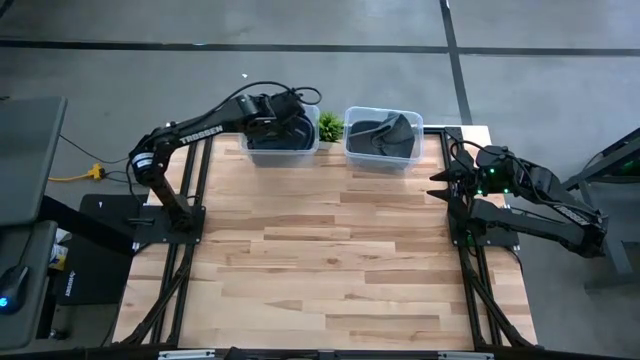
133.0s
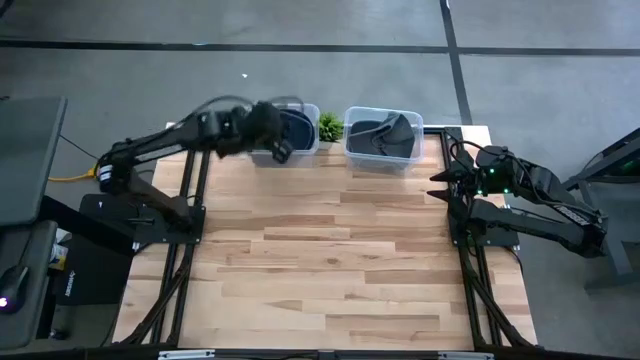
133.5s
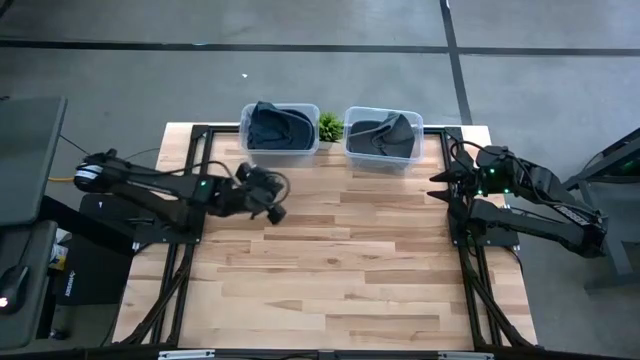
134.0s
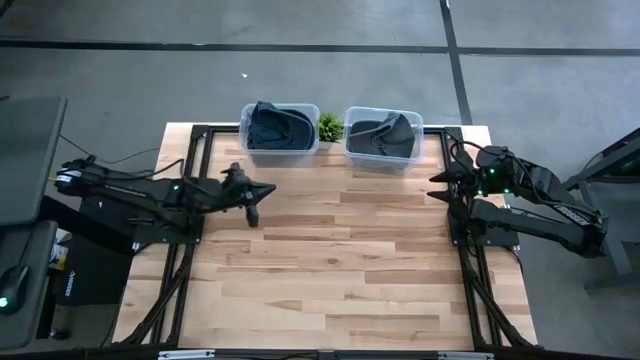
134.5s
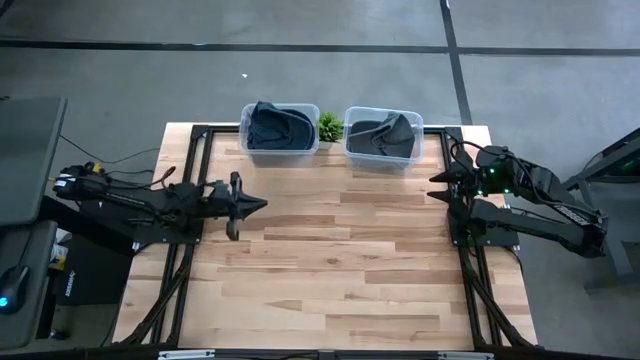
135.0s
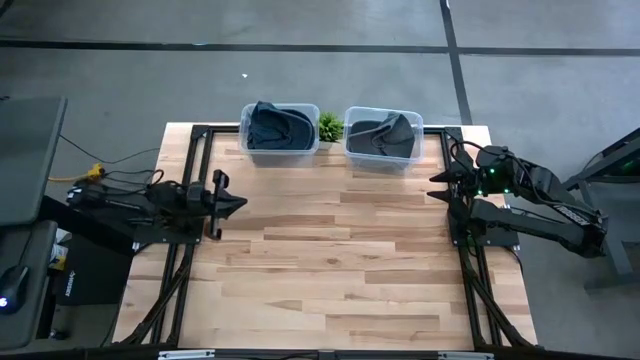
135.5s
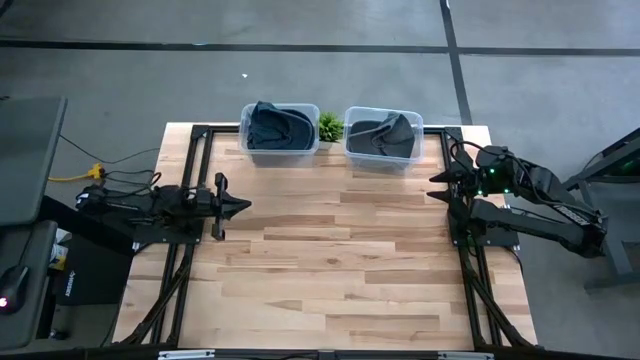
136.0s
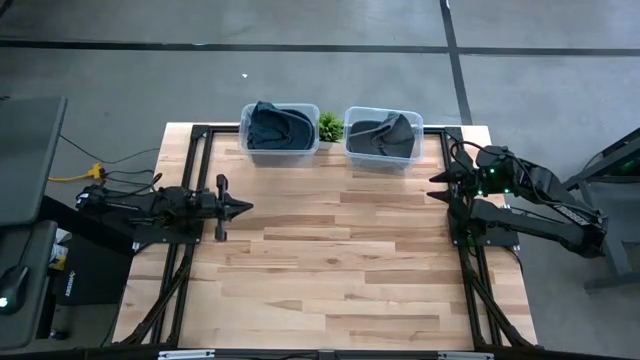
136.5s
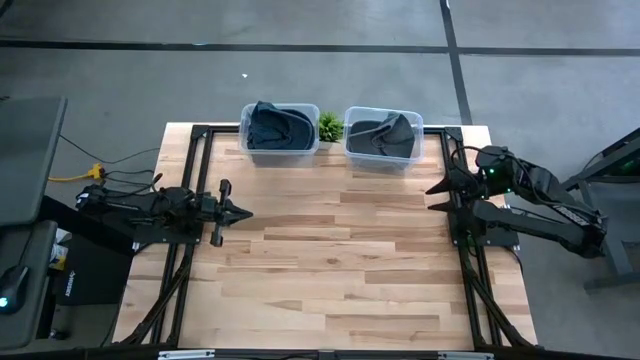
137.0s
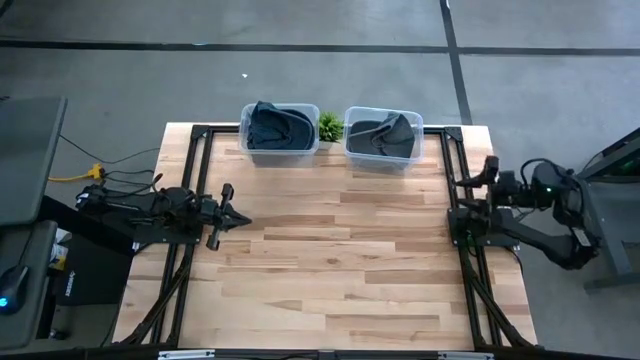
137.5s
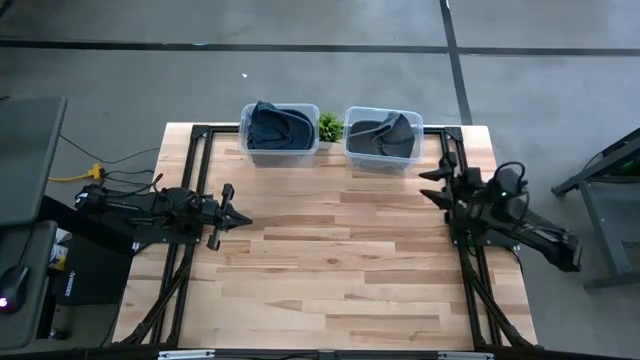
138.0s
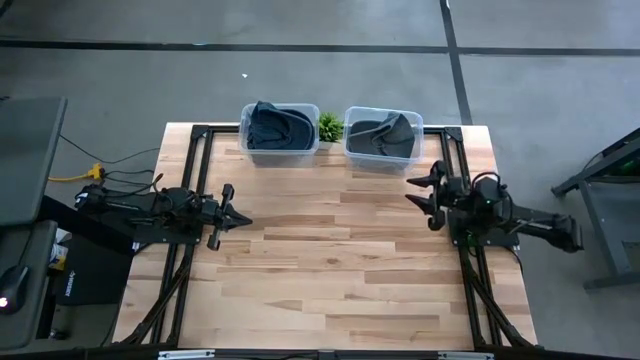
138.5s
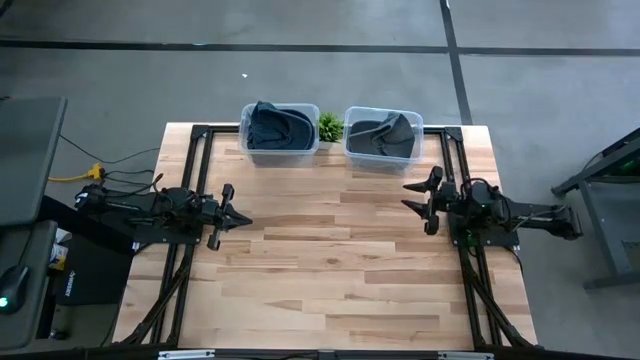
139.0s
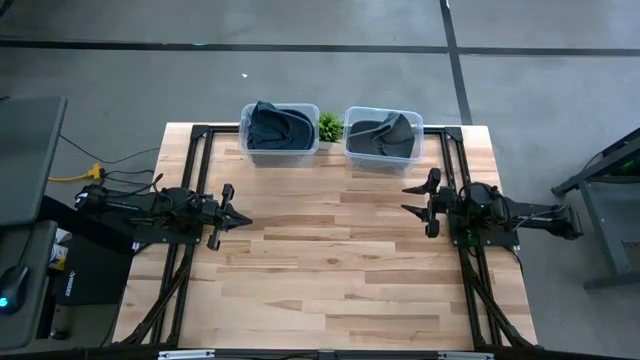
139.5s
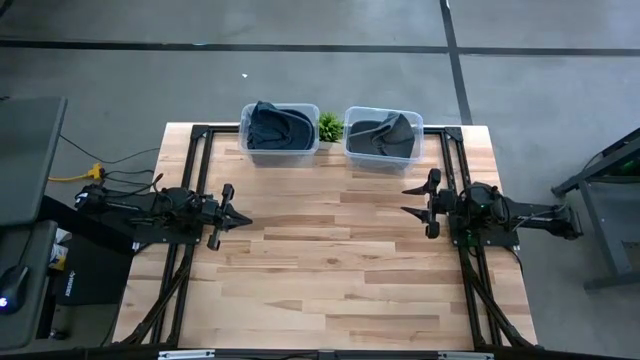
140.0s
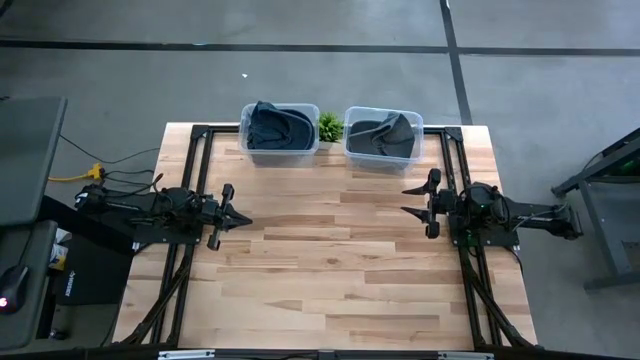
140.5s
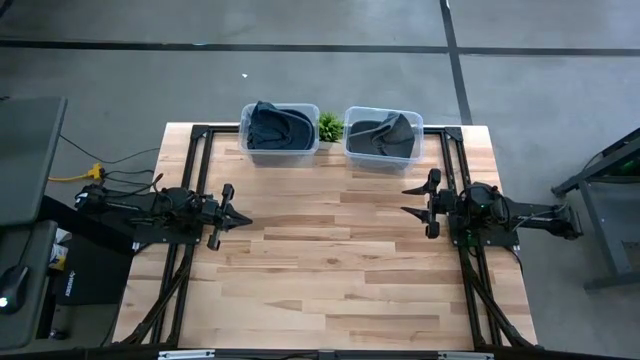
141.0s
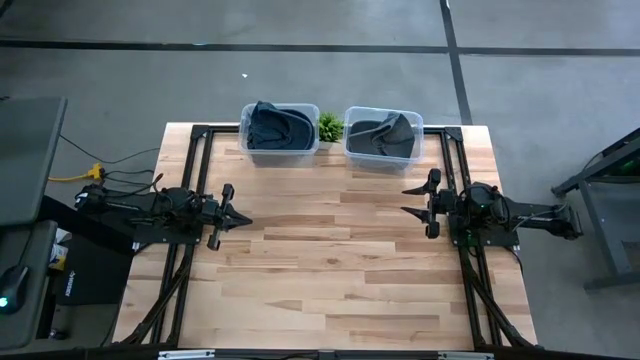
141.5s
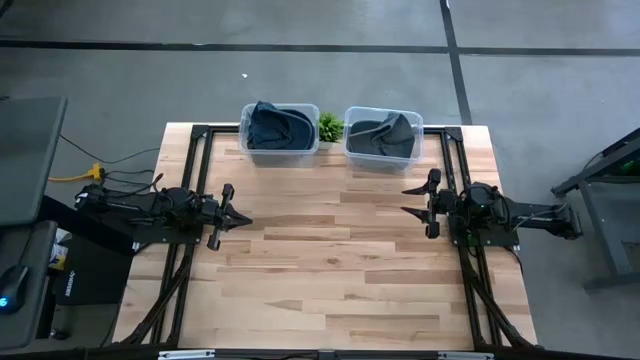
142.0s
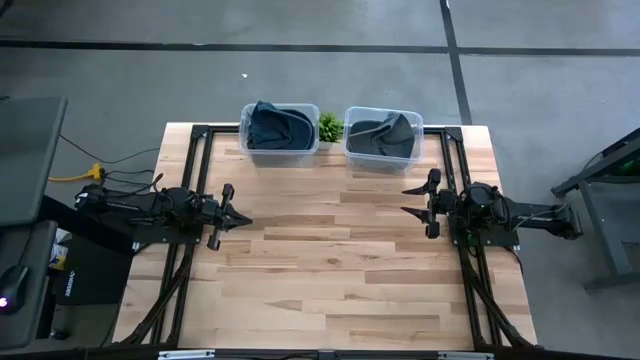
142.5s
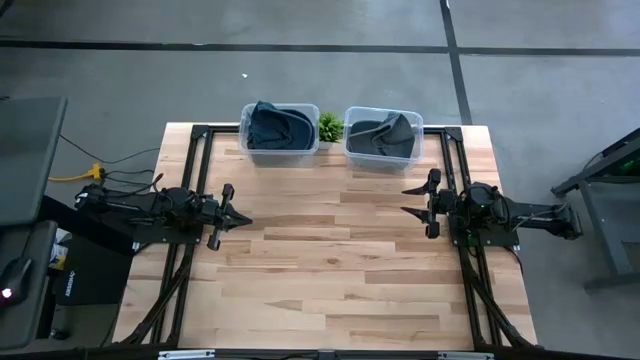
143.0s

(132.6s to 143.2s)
Task: Pick & Place hat
Return to Home Position

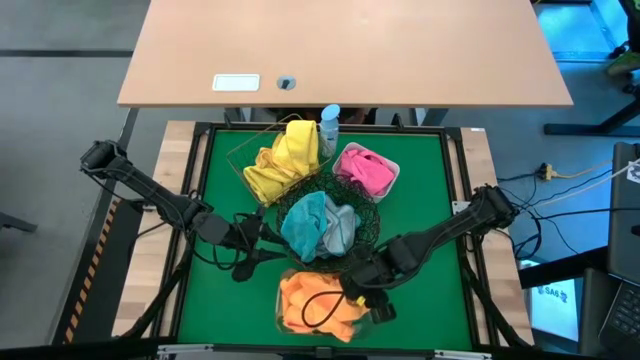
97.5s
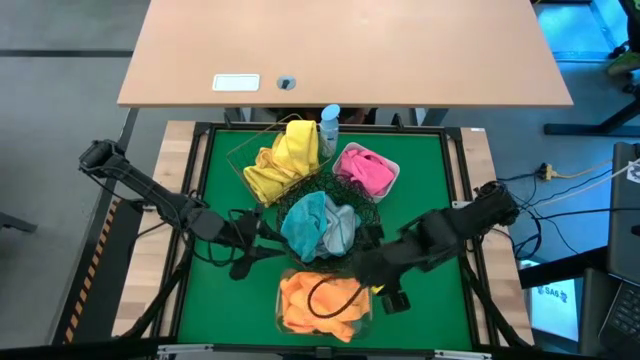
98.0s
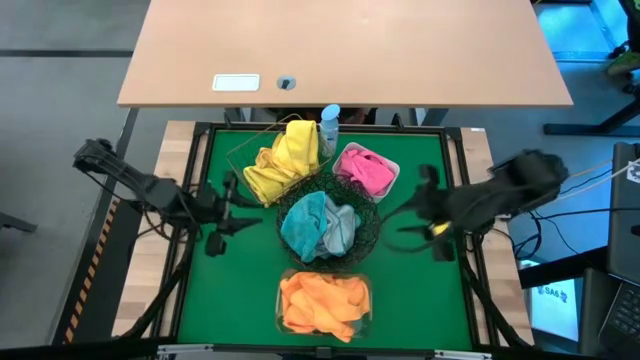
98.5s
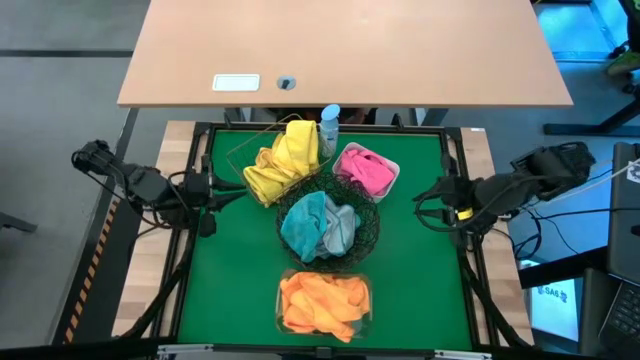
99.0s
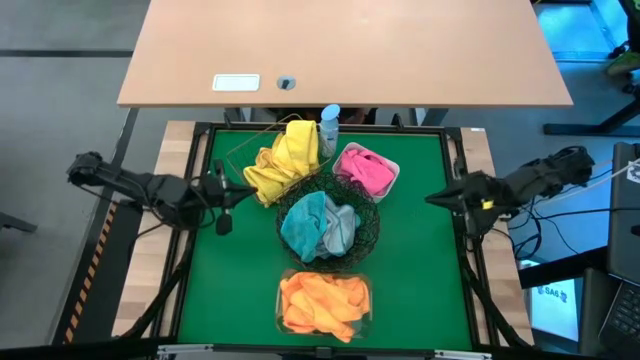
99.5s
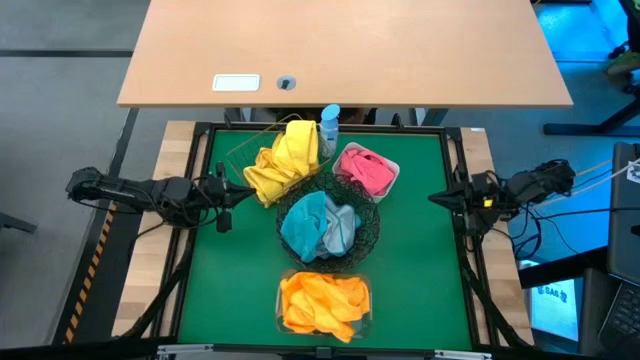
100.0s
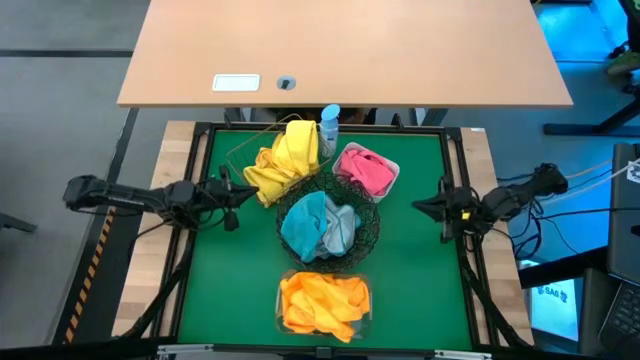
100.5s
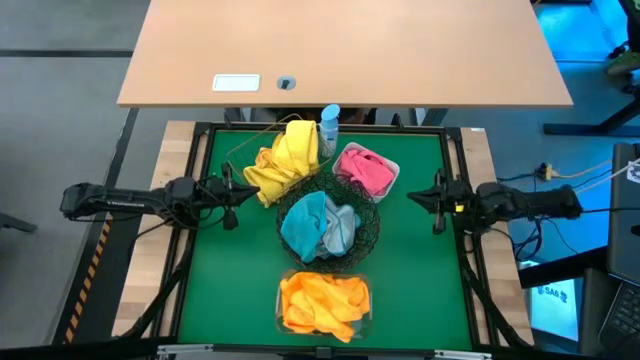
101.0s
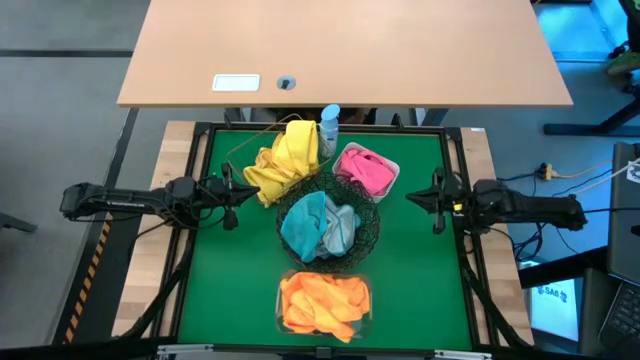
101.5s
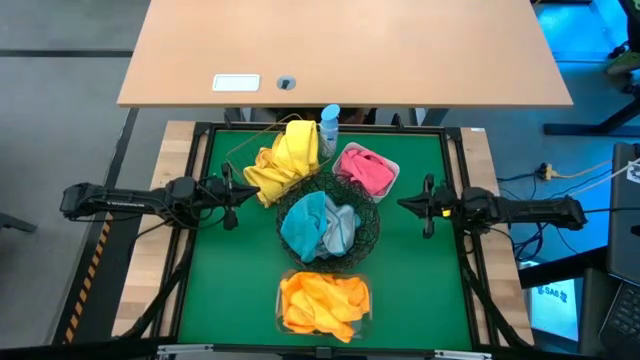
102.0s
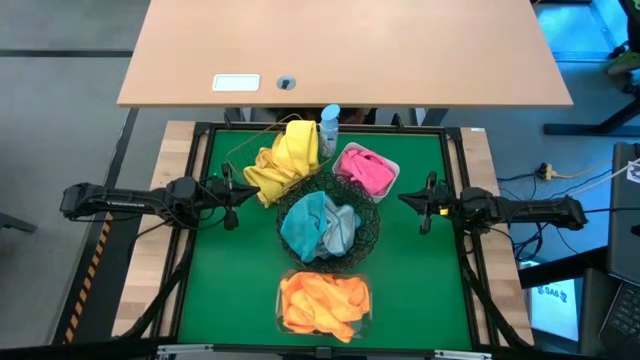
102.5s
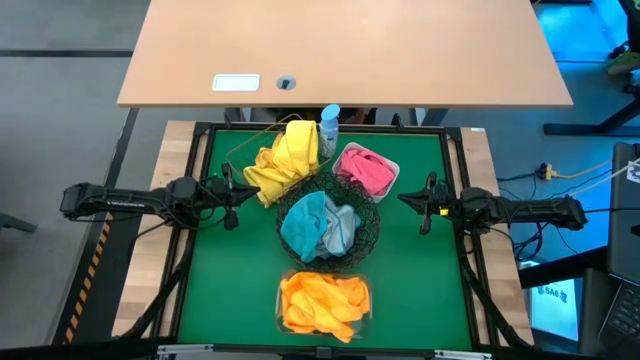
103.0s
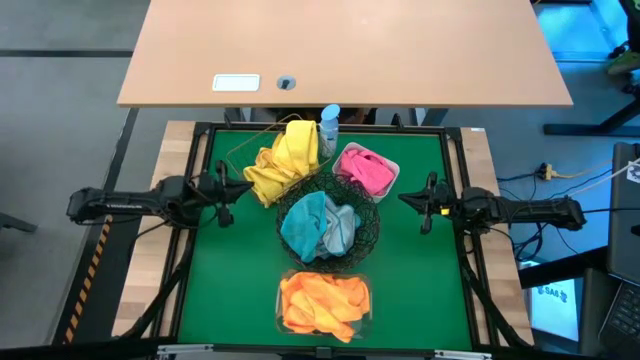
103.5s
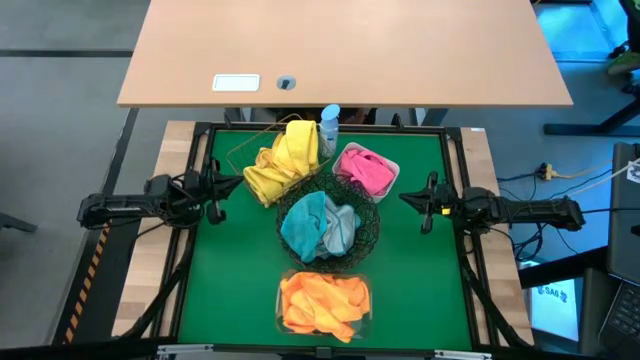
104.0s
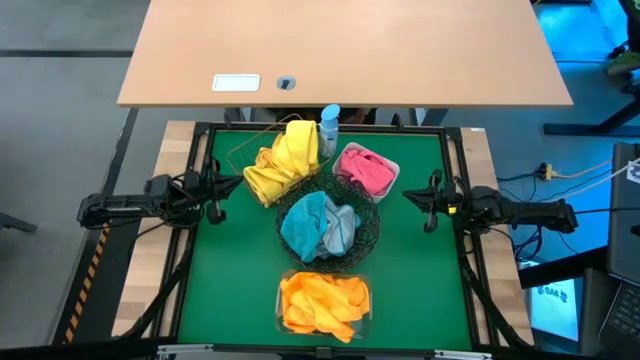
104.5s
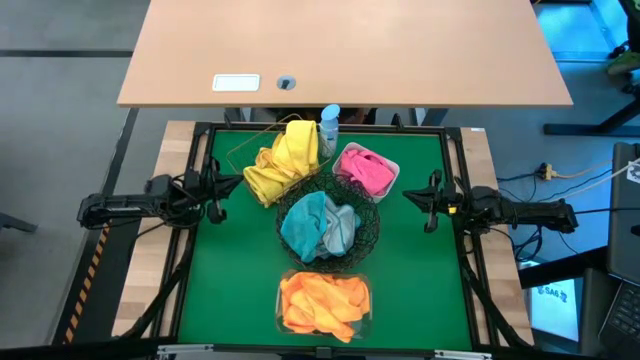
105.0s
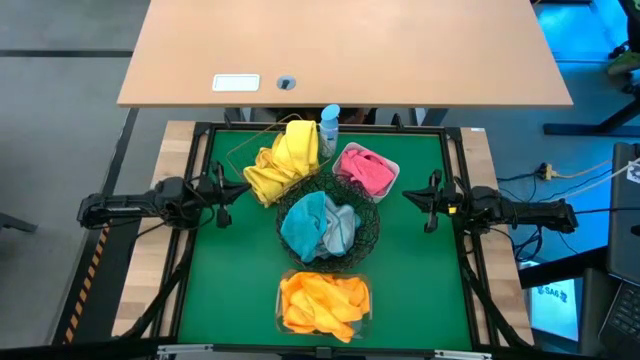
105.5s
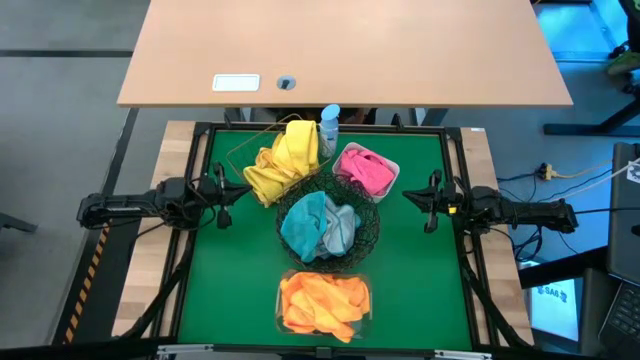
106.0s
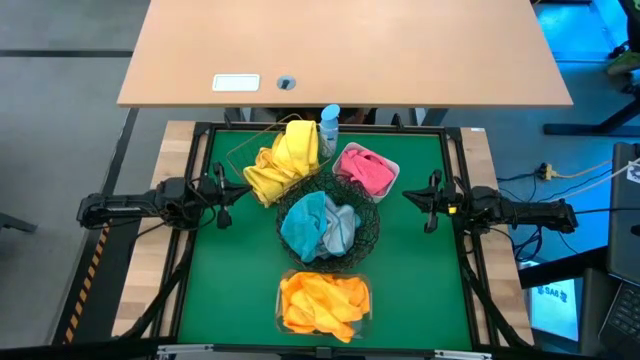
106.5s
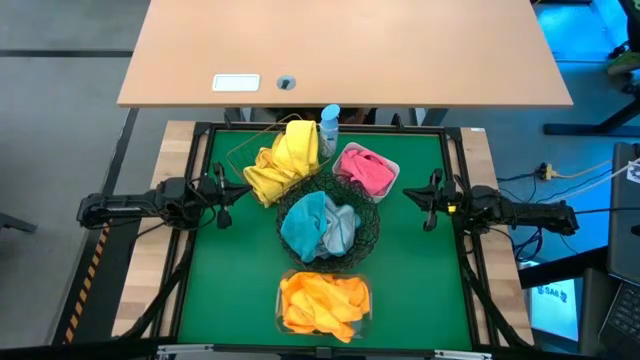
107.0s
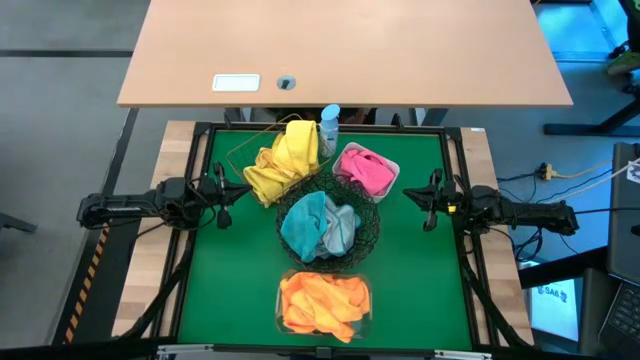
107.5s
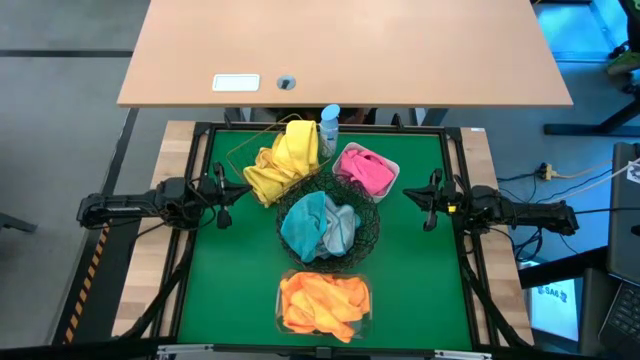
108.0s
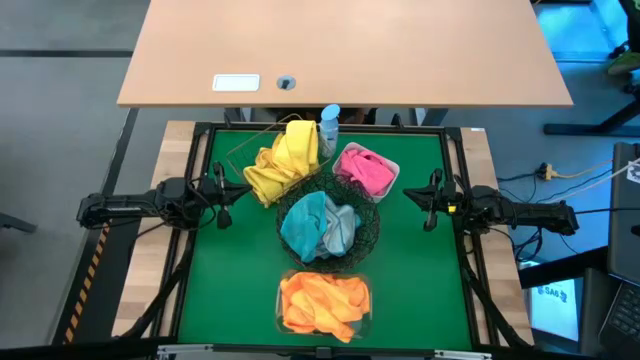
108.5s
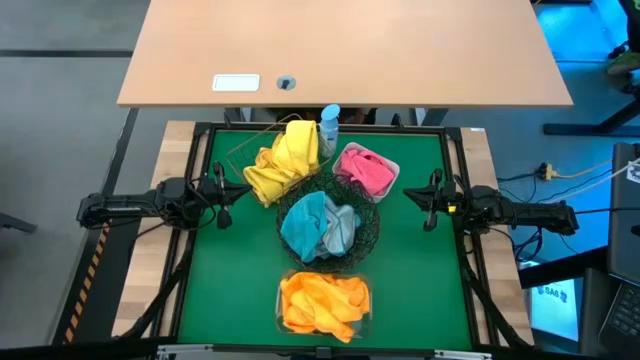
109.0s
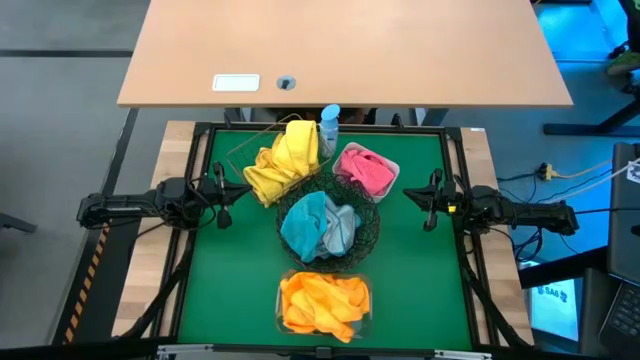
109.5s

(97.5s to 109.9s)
Task: Sort microfiber towel by color & place in baskets
Return to Home Position
